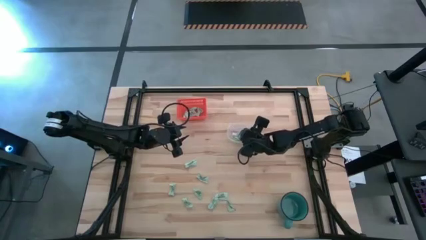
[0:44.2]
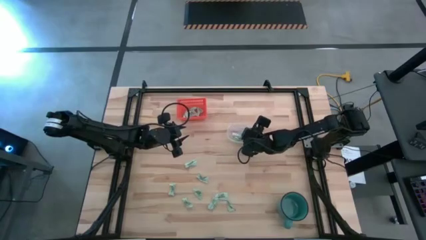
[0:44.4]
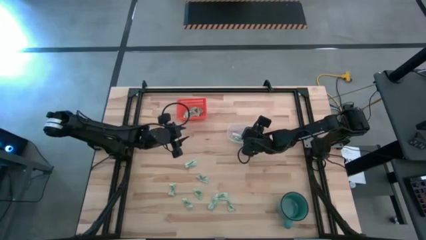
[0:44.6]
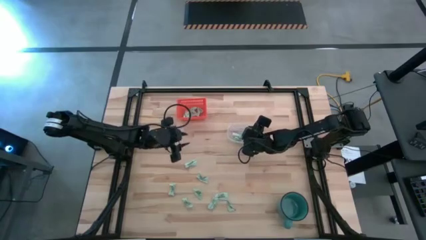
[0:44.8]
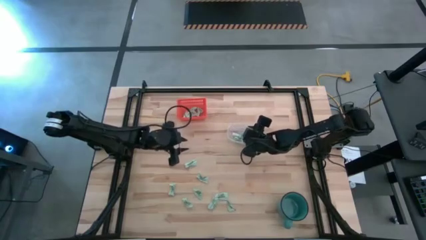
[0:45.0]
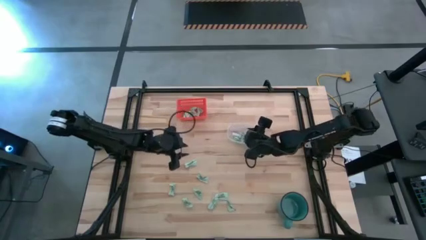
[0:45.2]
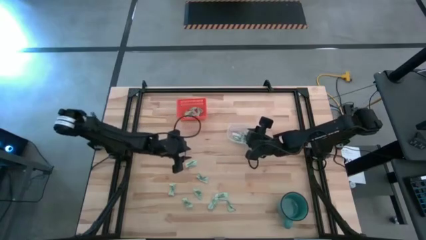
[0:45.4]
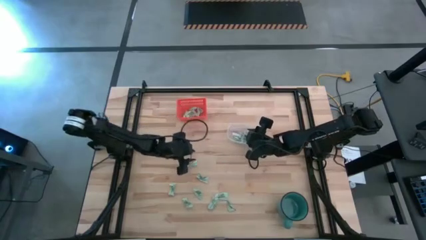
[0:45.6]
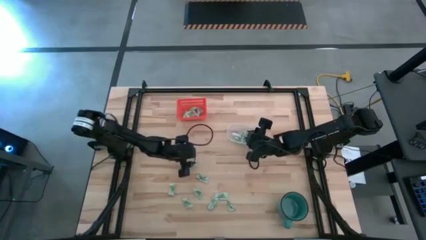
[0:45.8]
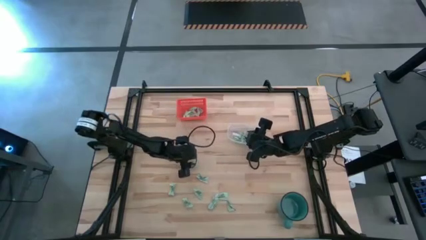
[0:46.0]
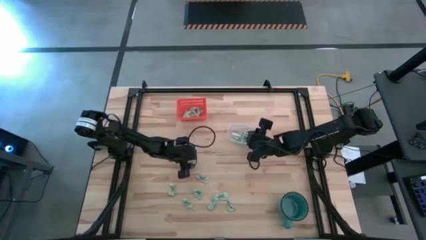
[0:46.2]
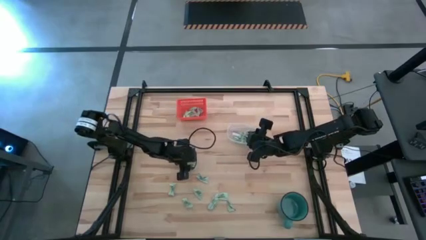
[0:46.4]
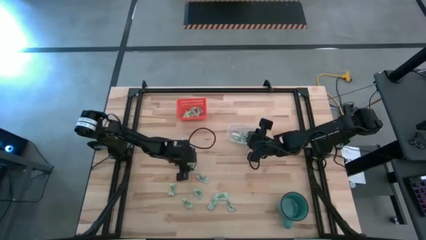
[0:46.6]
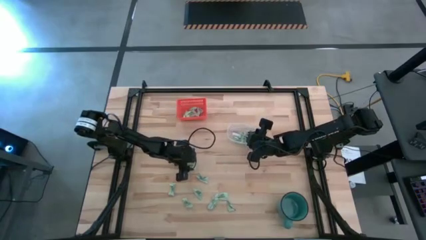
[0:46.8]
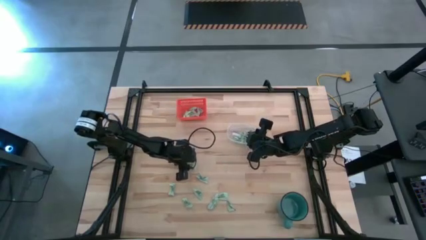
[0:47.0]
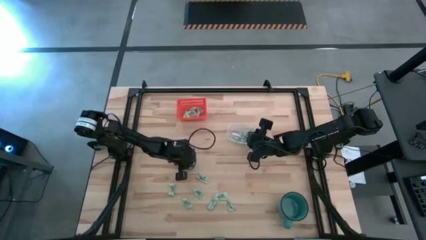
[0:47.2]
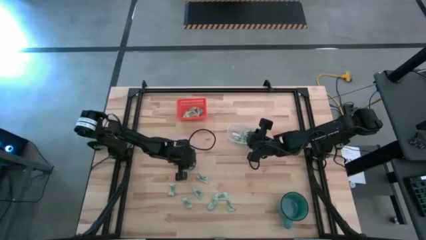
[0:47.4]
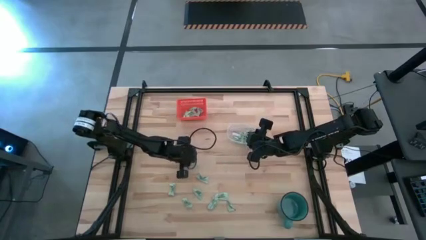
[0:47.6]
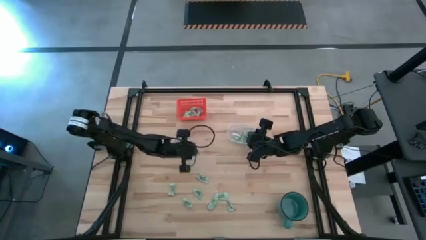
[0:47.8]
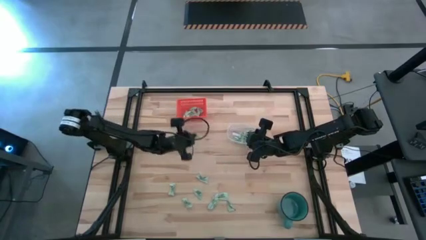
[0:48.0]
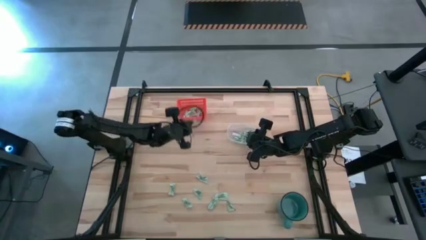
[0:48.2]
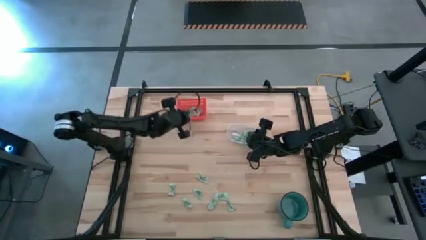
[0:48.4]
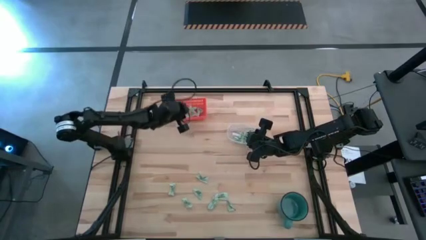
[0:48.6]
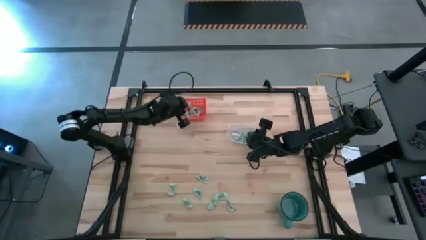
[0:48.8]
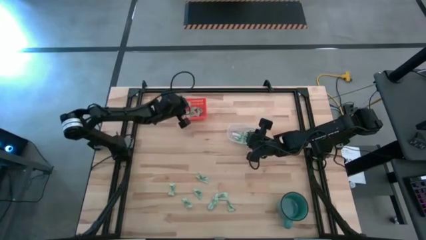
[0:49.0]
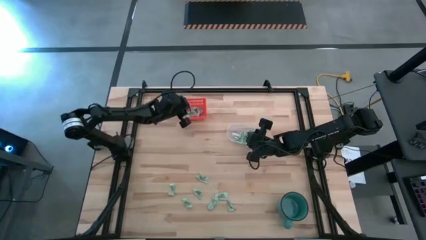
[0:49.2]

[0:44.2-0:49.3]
Task: Pick and place items into bin
Put the green stevia packet into the orange bin

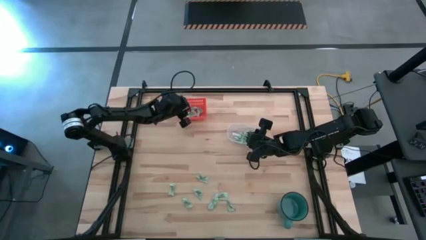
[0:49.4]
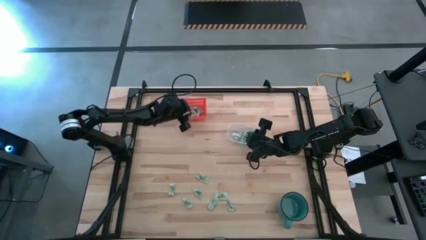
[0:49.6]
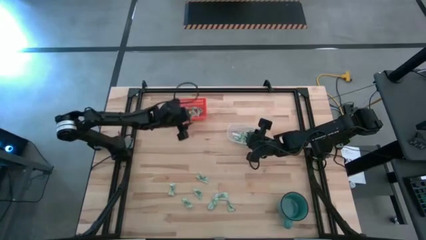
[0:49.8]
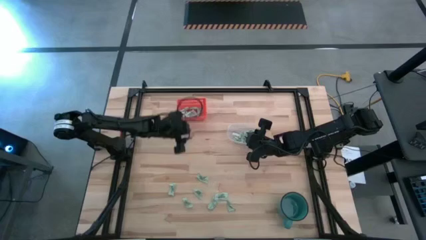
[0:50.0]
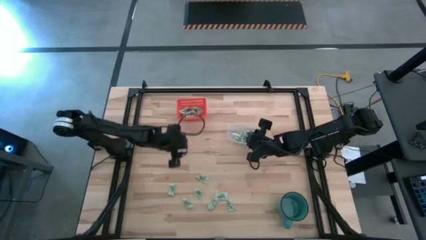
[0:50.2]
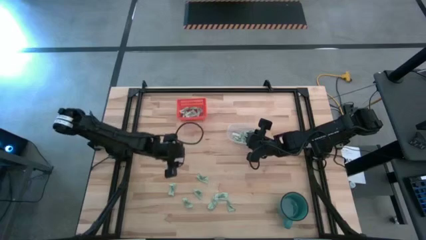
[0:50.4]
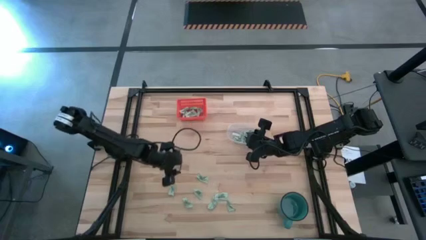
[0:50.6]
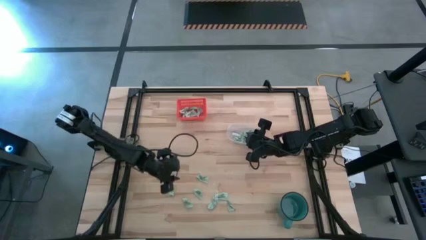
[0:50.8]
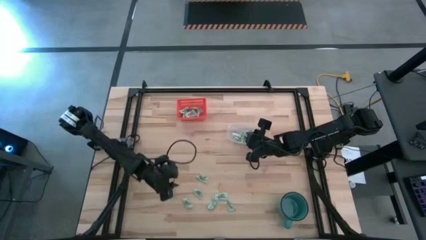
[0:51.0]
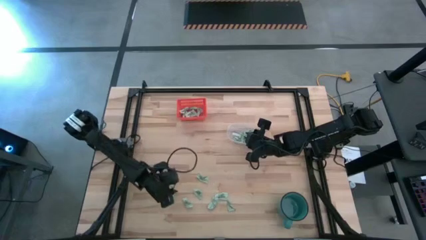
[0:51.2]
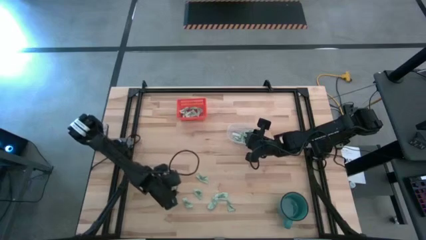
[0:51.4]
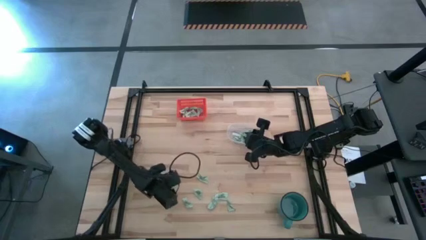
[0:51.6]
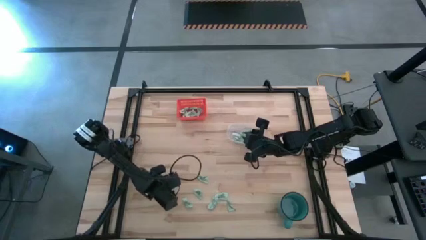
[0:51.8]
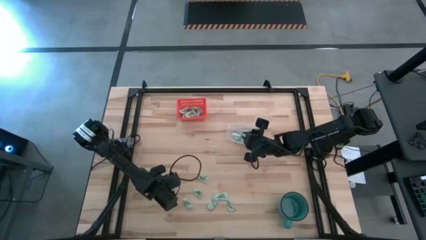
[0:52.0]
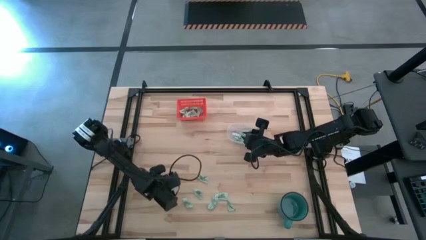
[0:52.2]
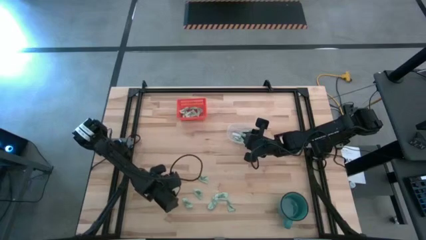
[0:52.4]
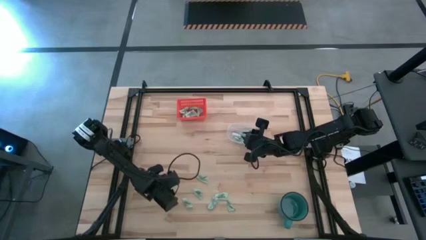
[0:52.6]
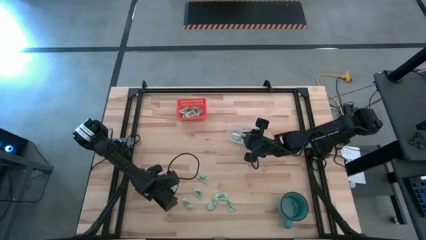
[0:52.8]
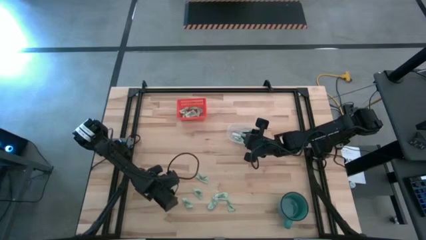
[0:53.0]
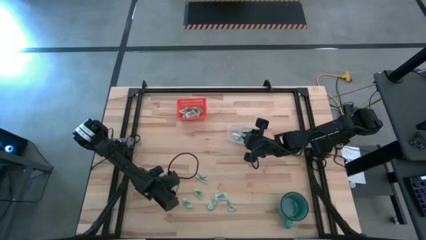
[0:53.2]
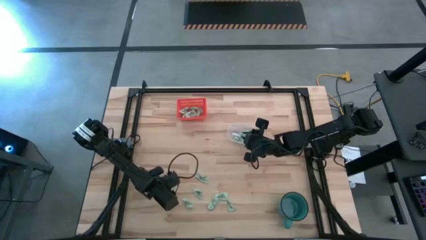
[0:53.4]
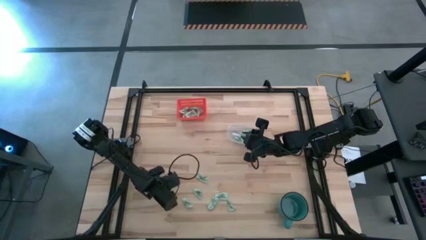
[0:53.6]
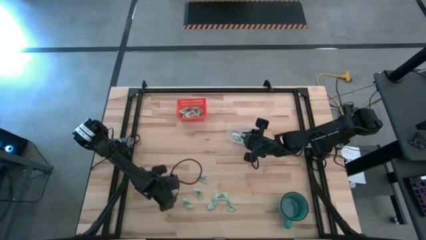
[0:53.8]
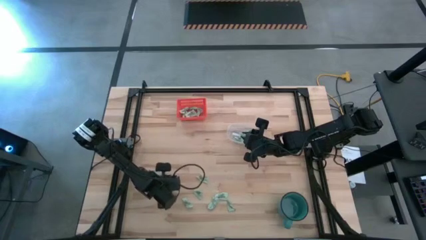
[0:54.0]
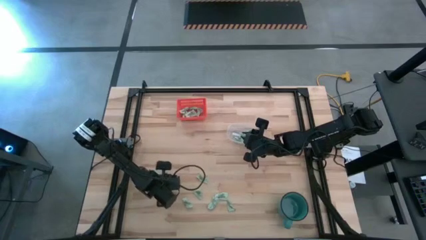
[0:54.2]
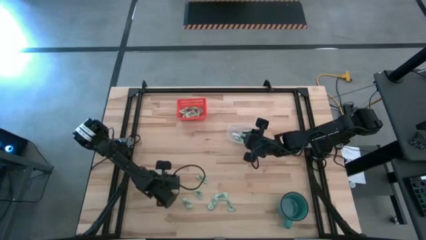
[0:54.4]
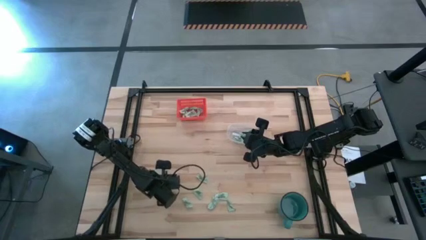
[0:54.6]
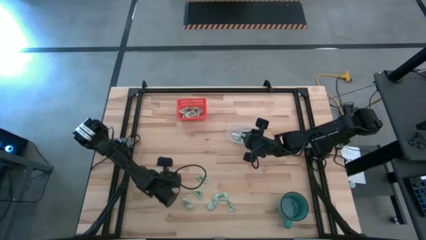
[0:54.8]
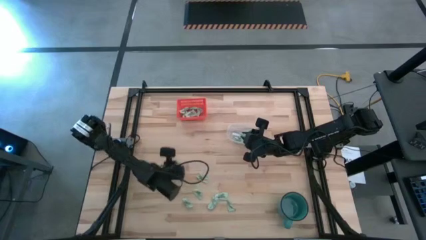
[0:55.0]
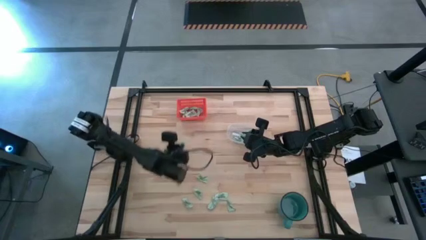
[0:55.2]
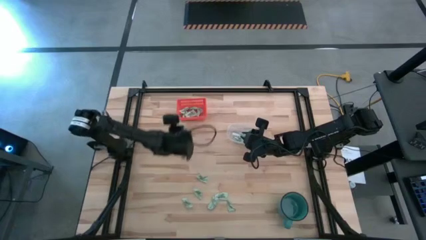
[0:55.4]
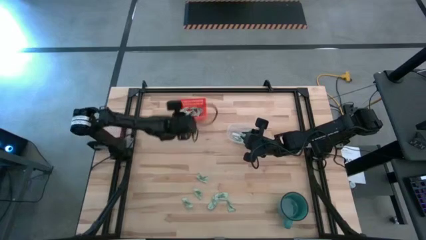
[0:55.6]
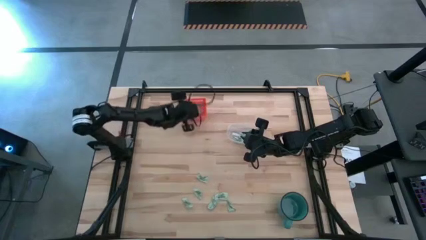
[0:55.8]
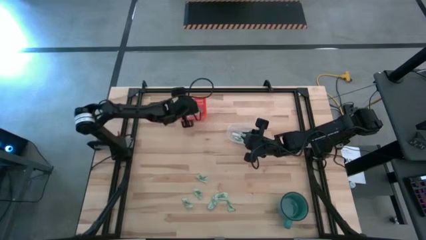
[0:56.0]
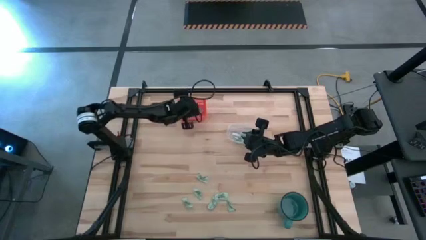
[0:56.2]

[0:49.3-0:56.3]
Put the green stevia packet into the orange bin

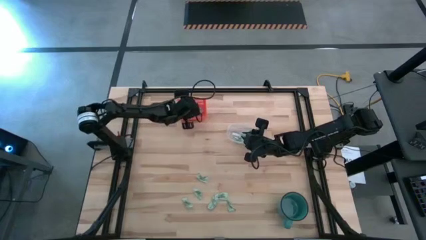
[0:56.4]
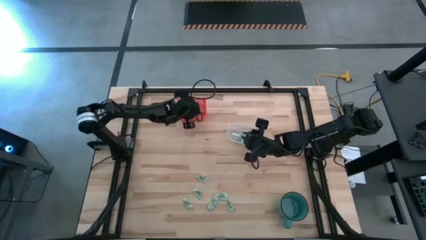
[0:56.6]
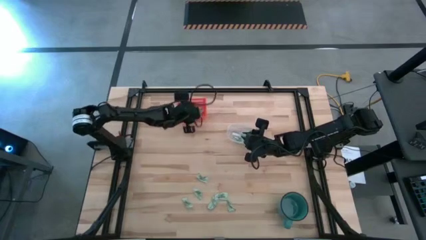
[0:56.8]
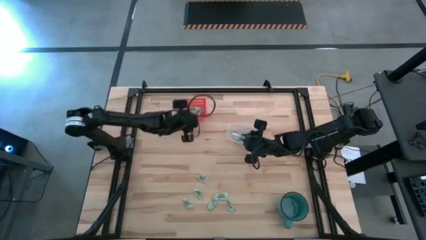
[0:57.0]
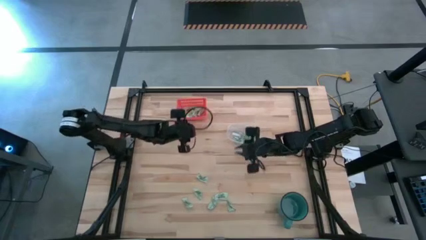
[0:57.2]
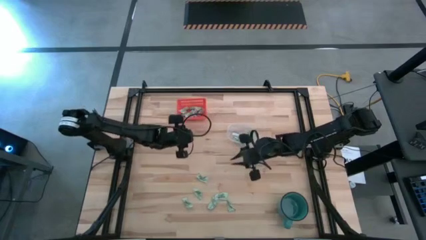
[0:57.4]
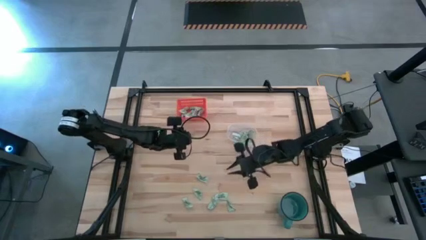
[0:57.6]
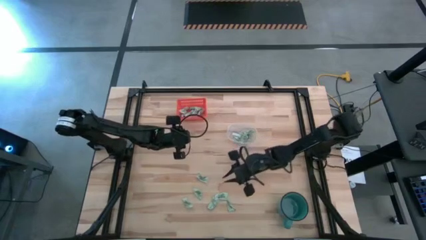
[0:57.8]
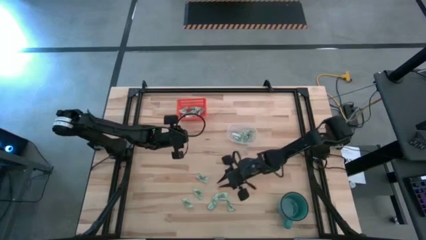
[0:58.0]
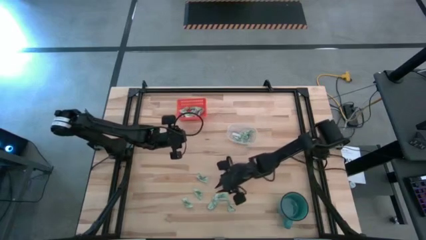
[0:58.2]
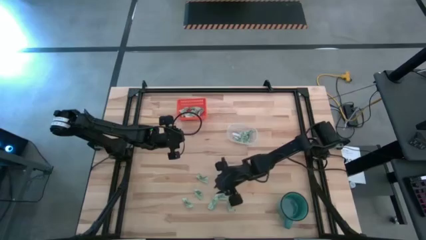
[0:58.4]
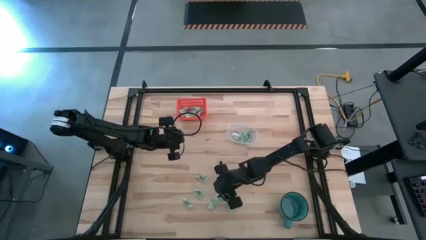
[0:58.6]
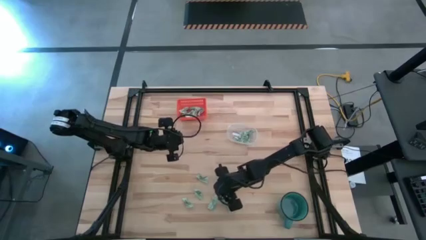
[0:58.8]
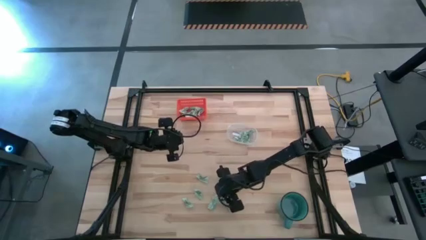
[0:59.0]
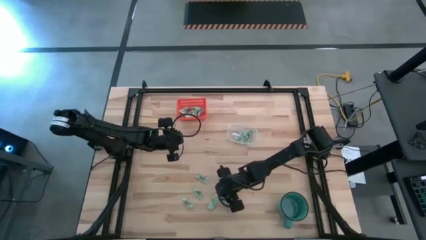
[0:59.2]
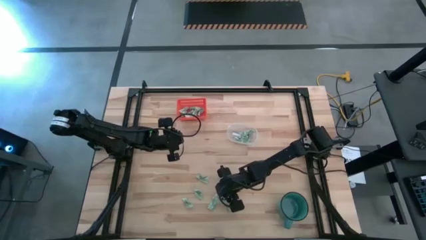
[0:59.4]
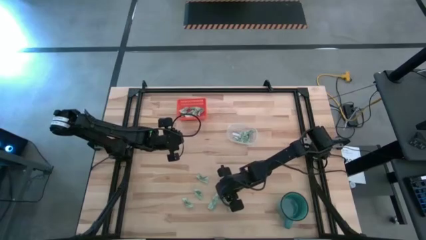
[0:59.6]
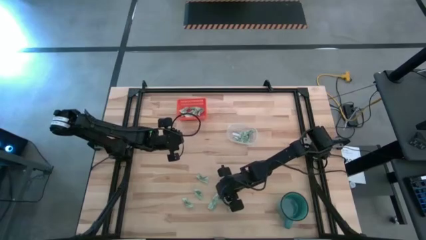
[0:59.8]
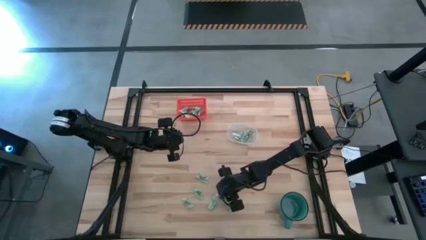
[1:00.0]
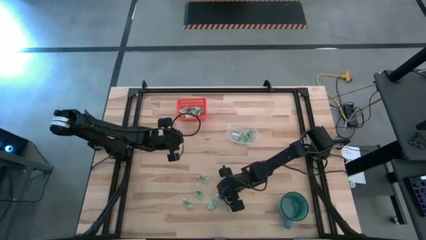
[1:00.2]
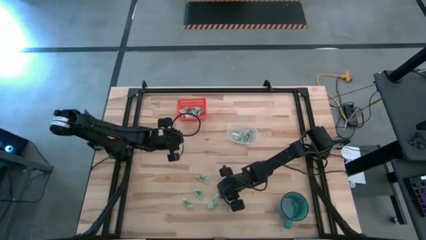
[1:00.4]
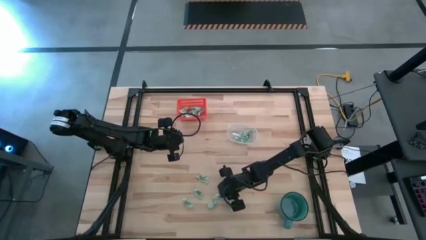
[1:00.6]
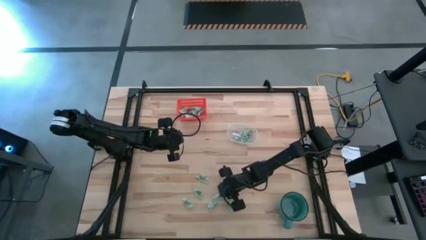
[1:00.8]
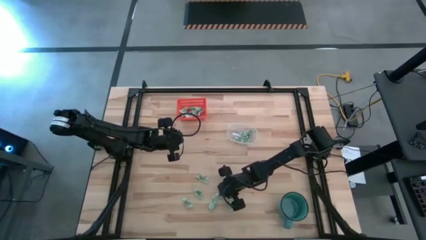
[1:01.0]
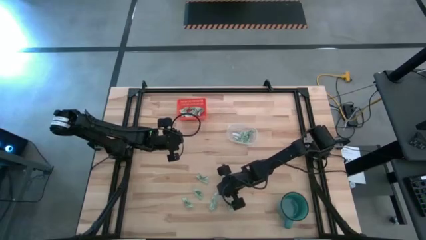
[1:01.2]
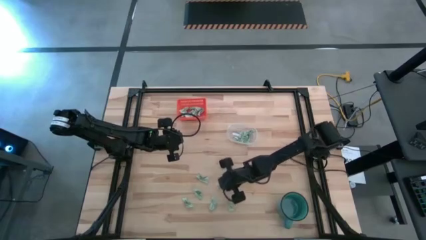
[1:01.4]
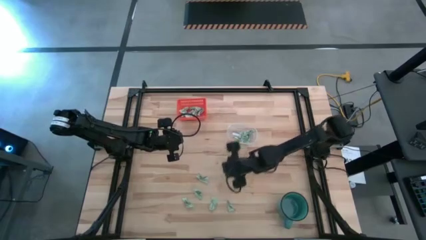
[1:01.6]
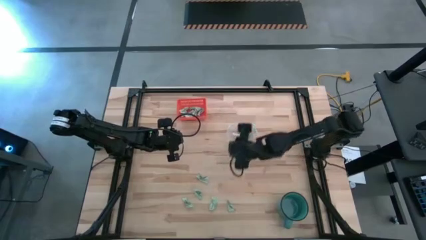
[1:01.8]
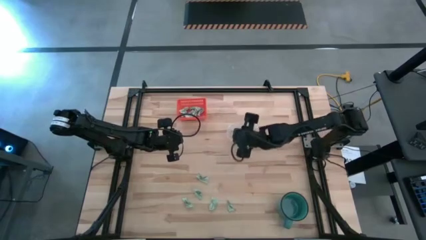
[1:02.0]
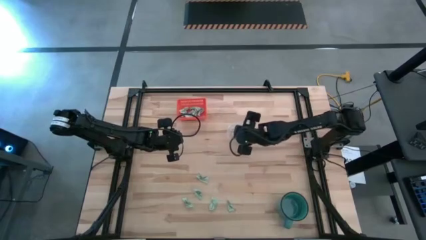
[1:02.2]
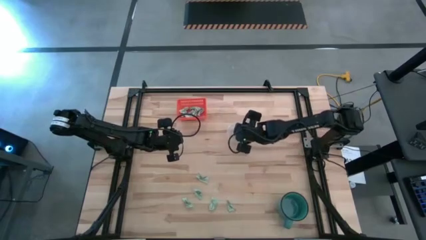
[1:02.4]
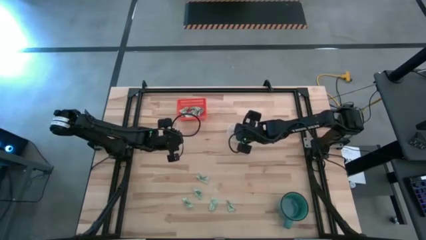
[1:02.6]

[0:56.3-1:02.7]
Put the green stevia packet into the transparent bin
